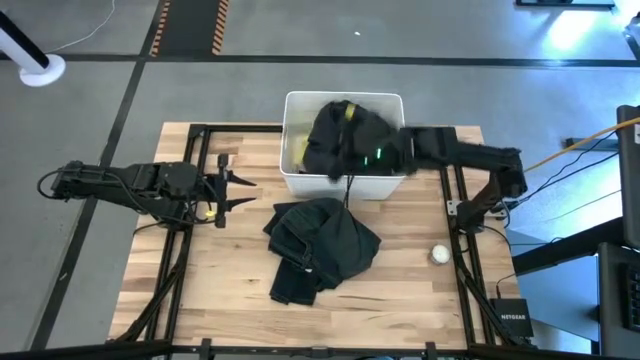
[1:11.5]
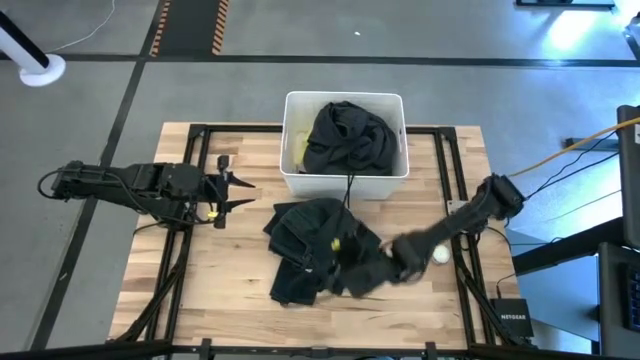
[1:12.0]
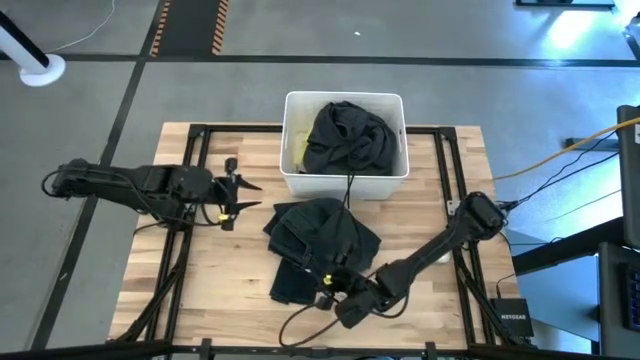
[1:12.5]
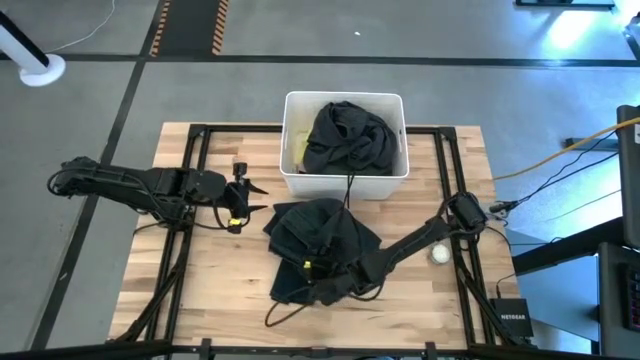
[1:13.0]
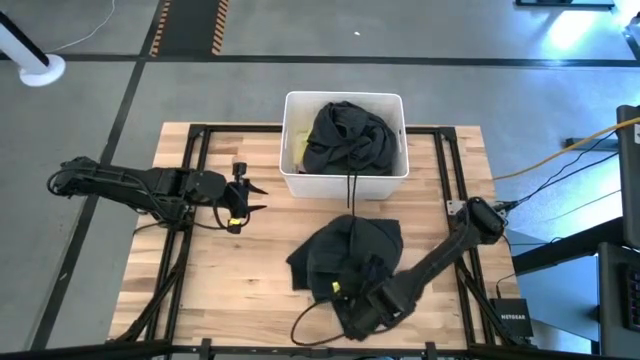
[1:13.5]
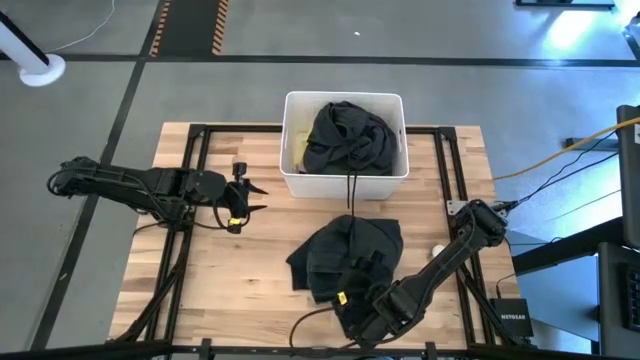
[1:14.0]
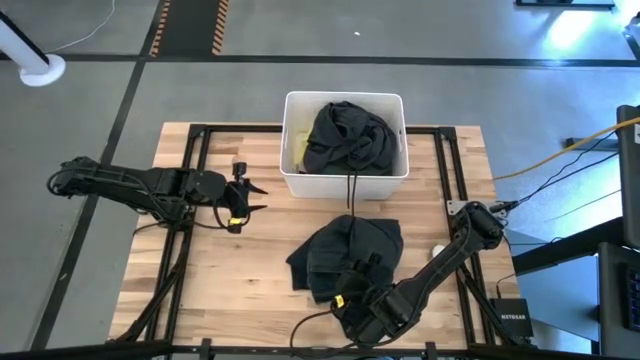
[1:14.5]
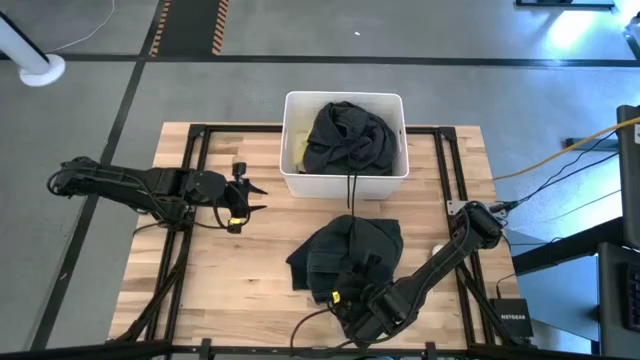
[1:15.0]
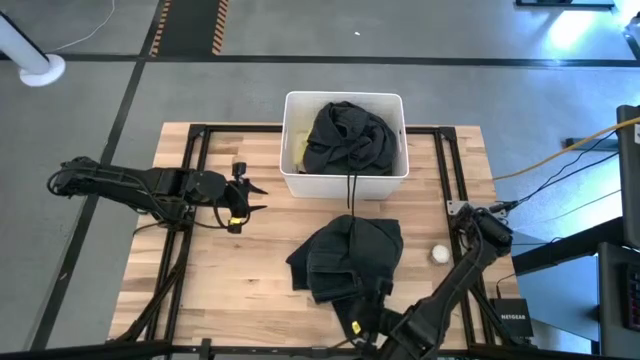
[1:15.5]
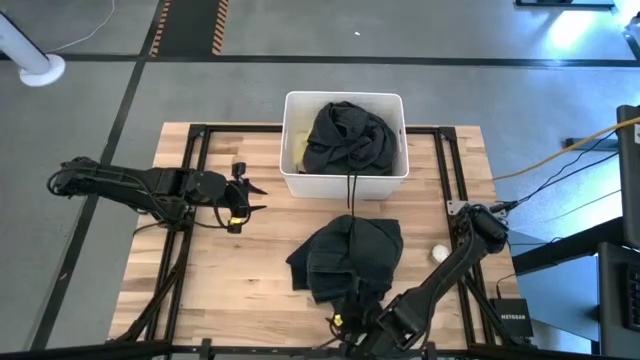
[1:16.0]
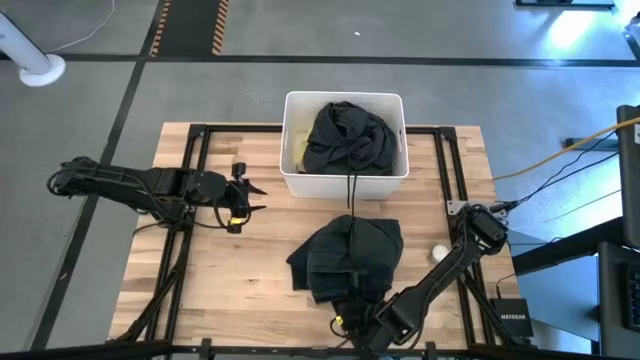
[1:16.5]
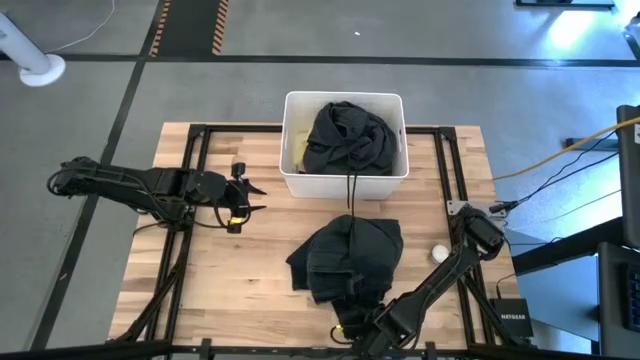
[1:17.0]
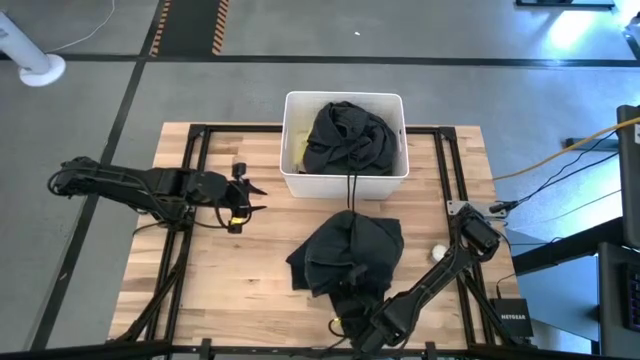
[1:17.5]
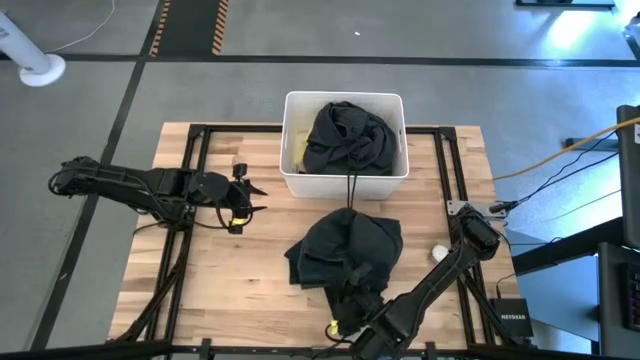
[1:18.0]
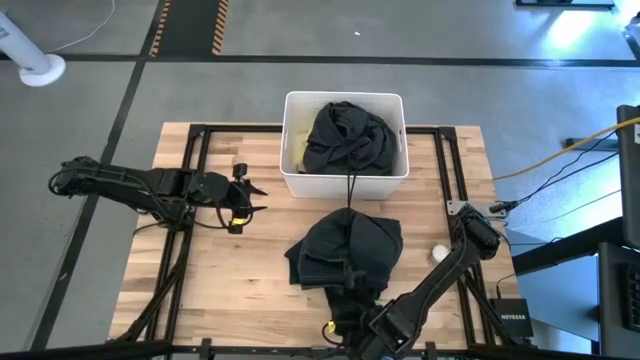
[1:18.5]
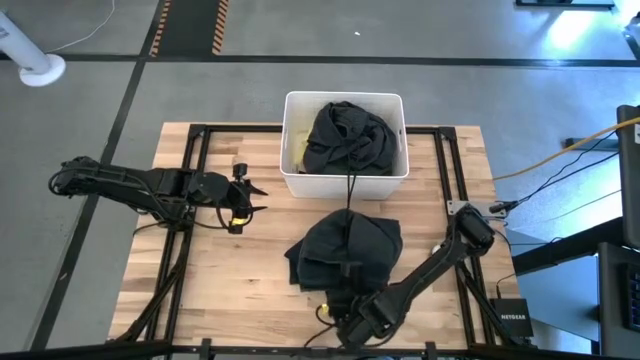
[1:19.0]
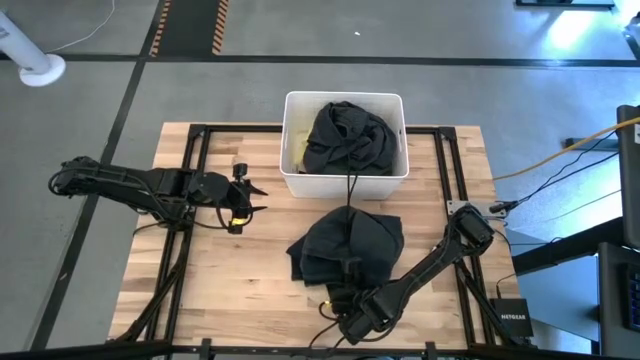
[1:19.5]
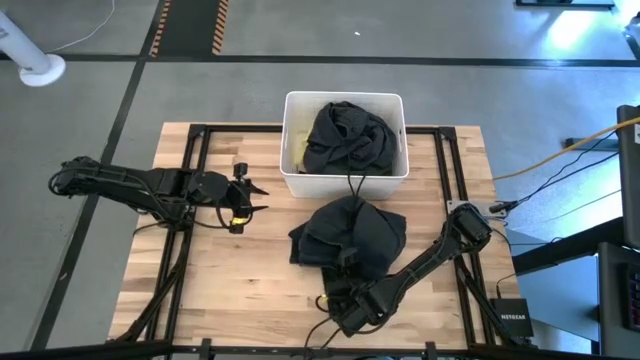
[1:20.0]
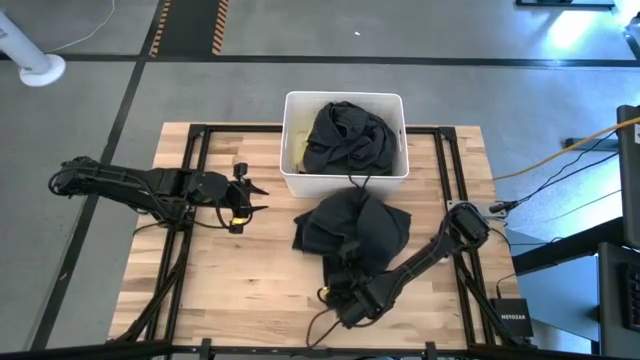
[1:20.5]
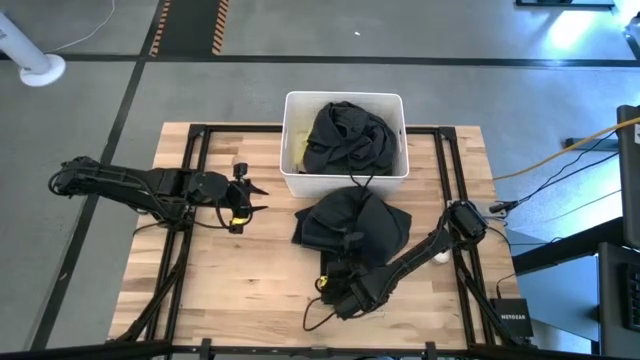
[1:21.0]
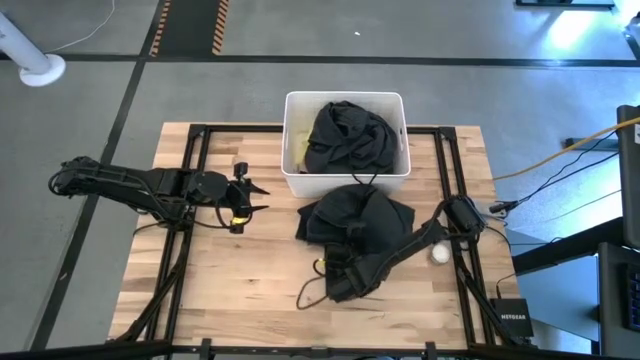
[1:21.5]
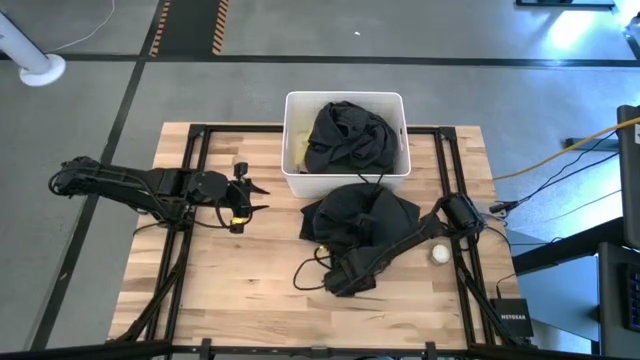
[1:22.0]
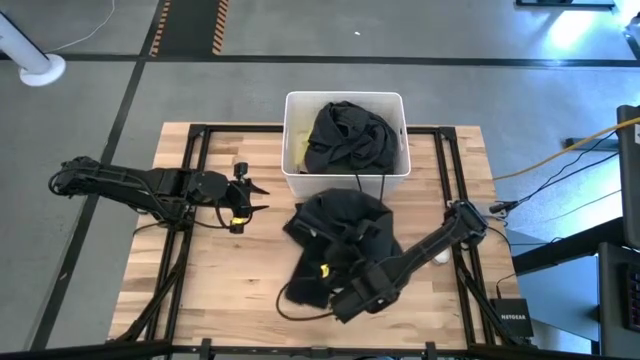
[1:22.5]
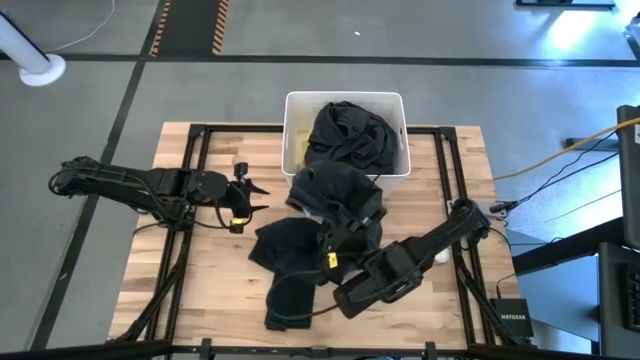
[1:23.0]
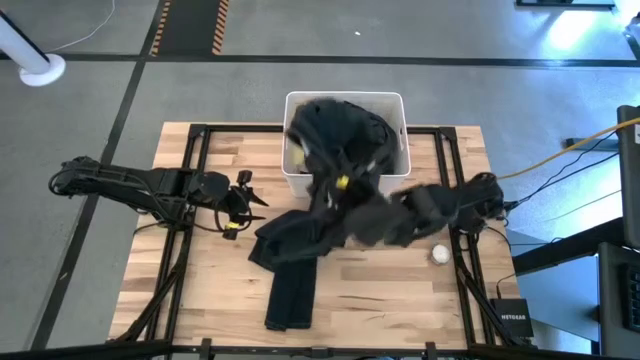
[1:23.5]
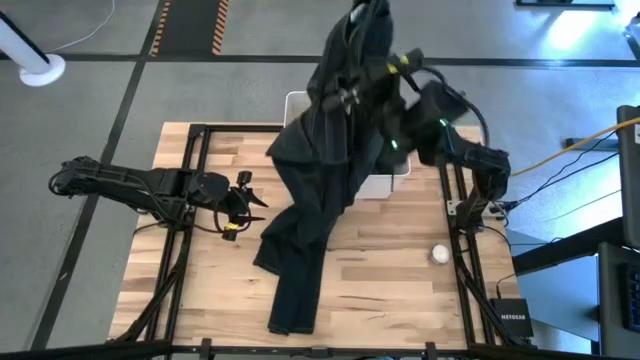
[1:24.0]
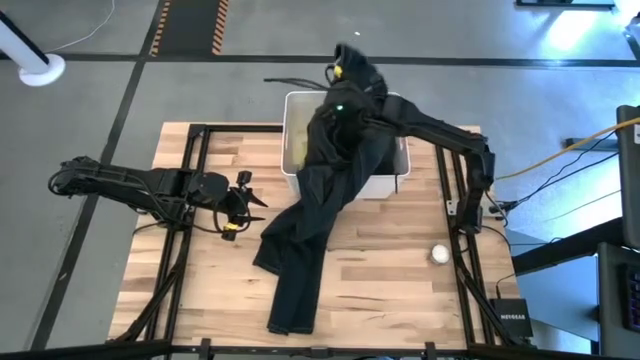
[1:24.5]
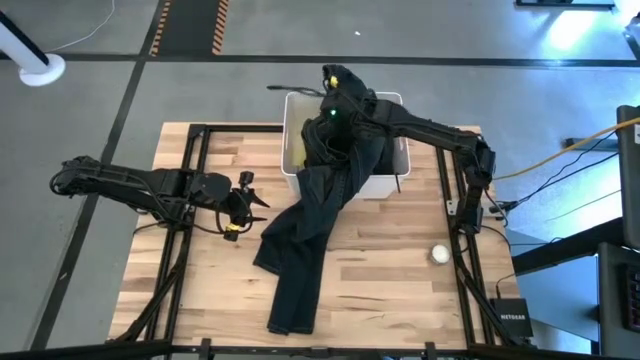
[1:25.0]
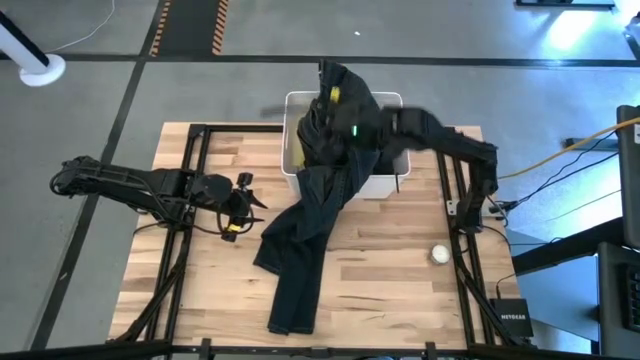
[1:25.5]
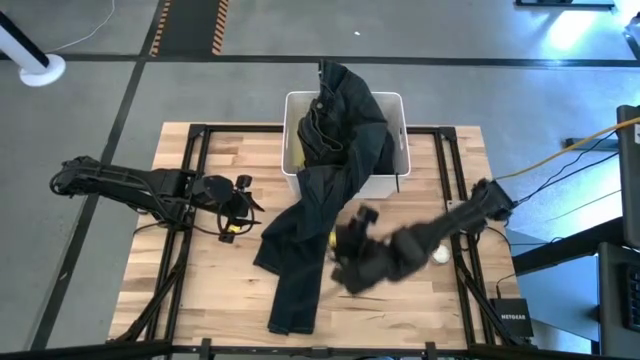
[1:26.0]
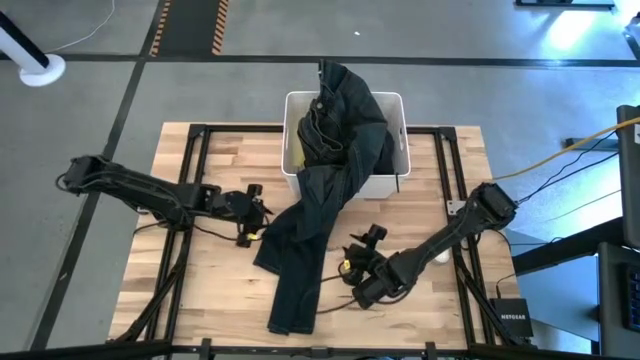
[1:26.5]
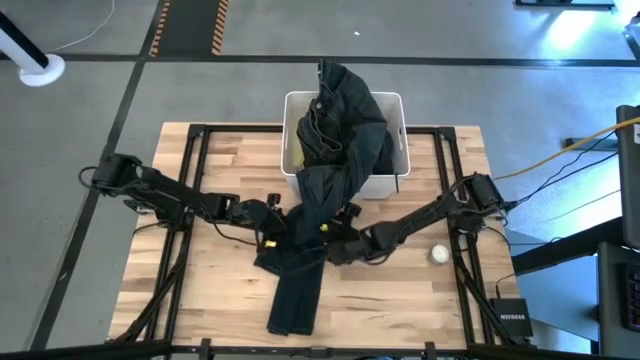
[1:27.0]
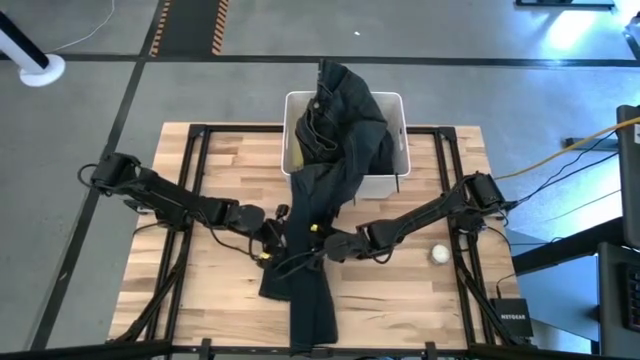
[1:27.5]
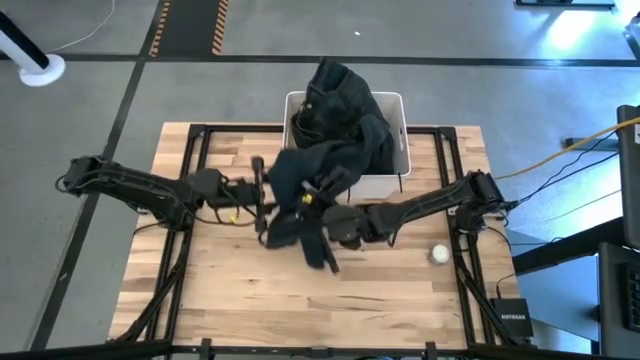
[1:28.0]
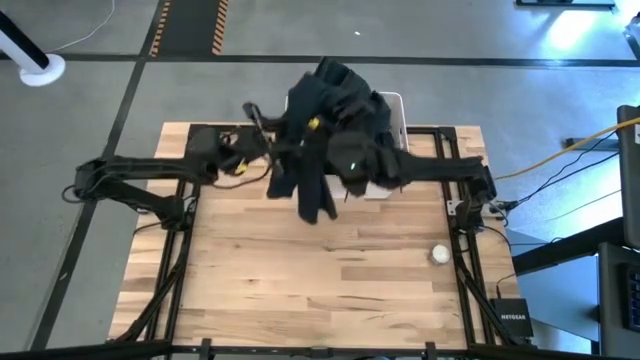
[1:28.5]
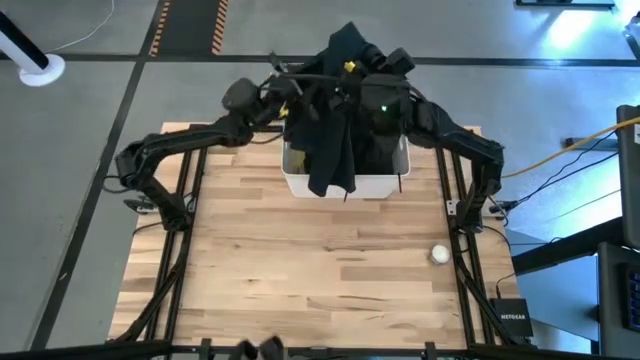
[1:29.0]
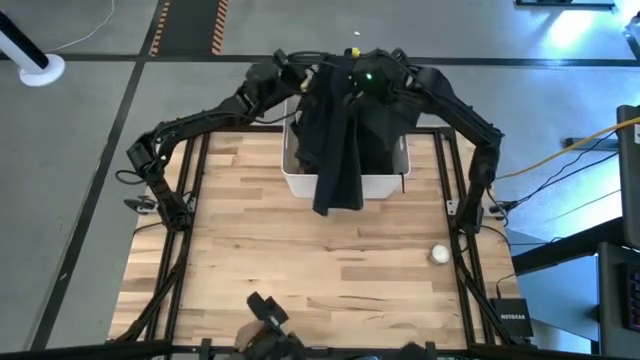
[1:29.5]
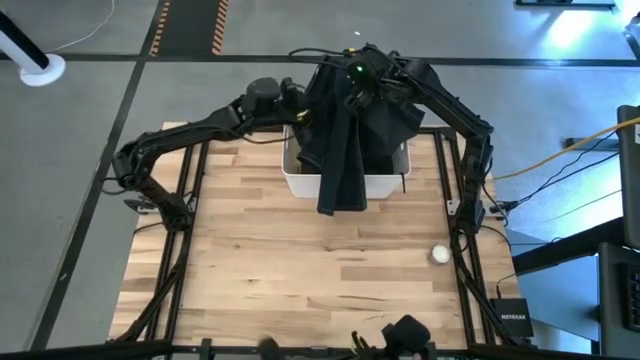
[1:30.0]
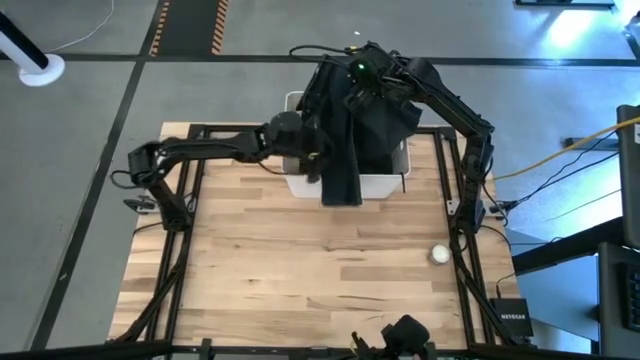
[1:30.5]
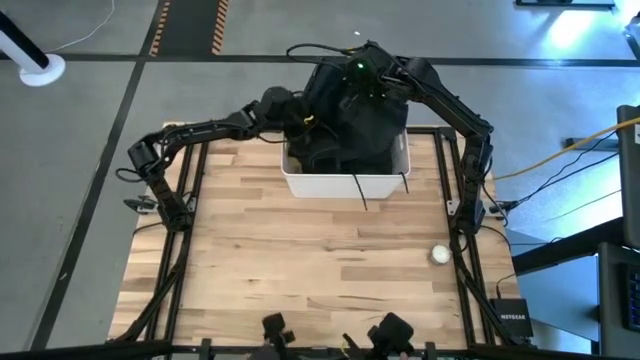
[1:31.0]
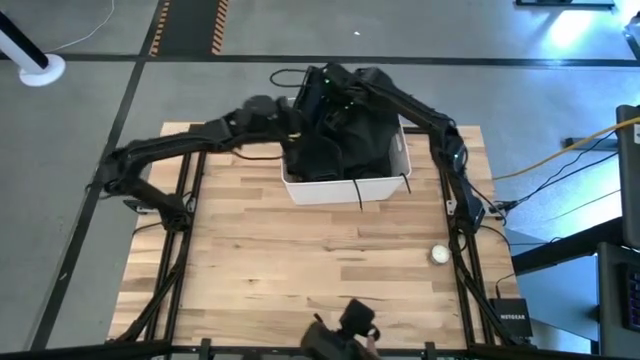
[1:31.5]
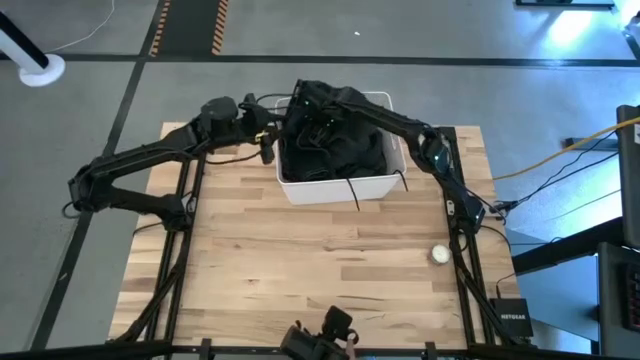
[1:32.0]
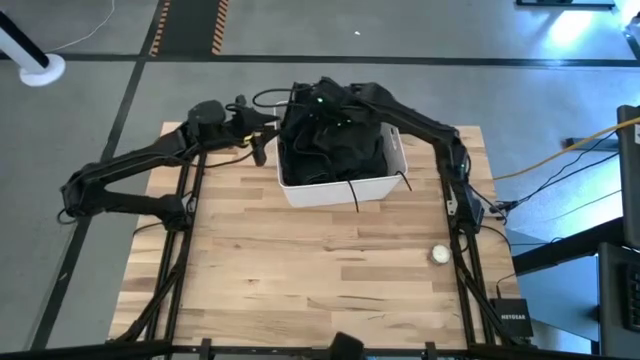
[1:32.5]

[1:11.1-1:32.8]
Task: Sort clothes
Put the blue pants into the white bin
